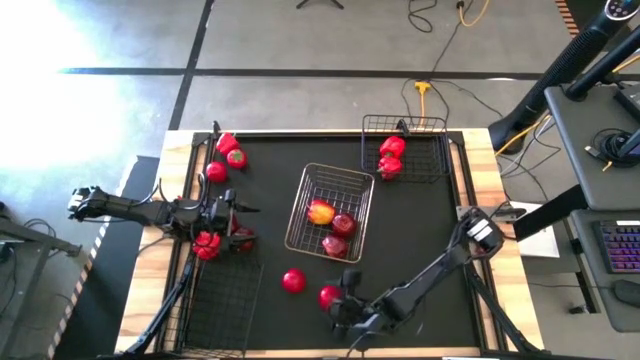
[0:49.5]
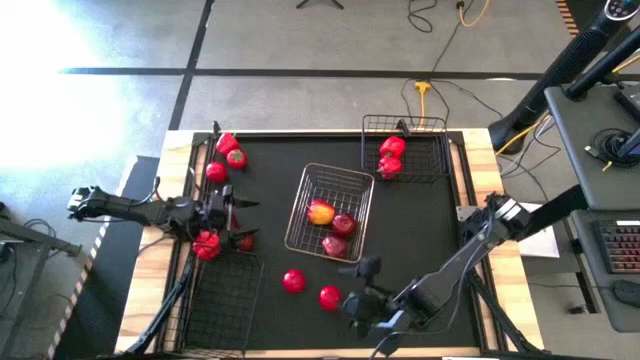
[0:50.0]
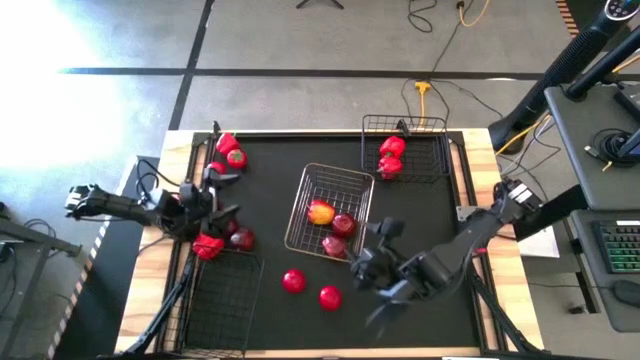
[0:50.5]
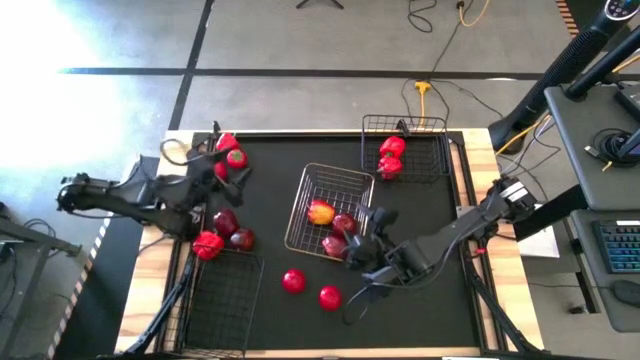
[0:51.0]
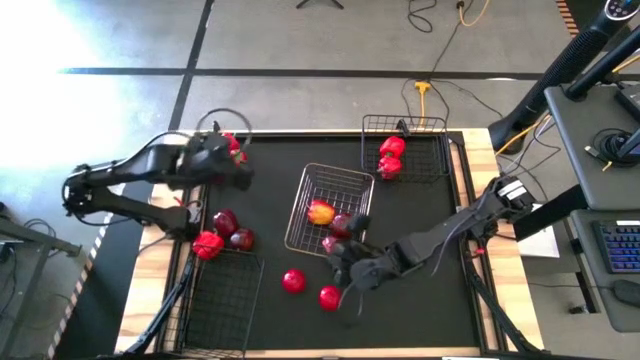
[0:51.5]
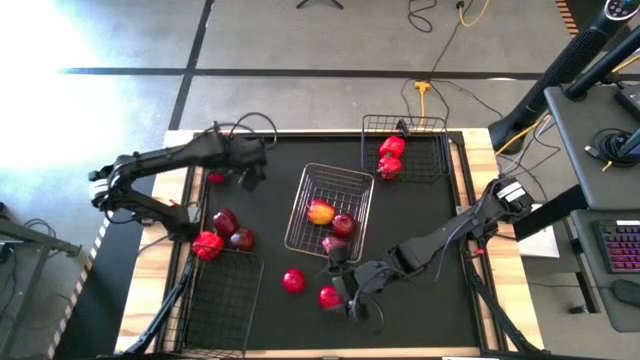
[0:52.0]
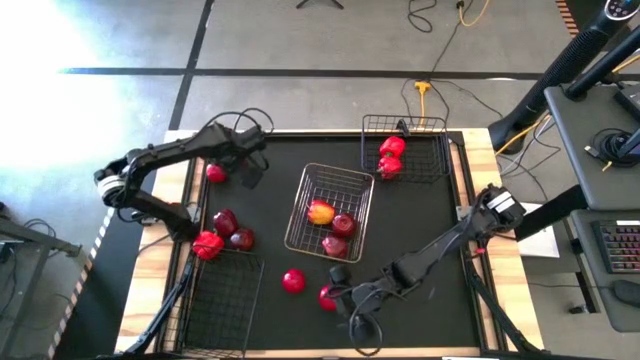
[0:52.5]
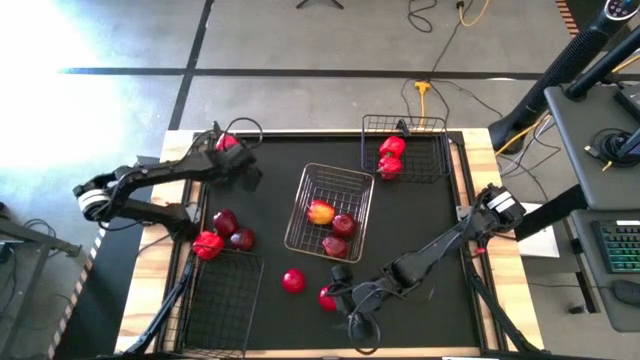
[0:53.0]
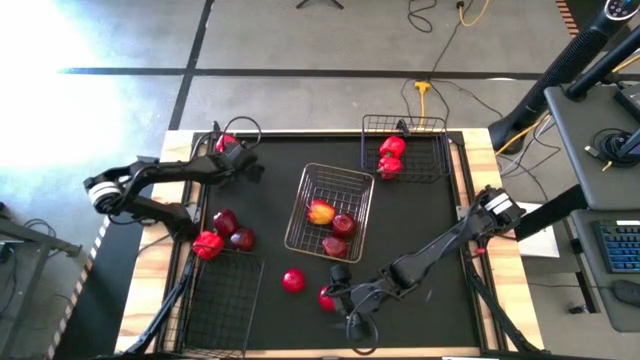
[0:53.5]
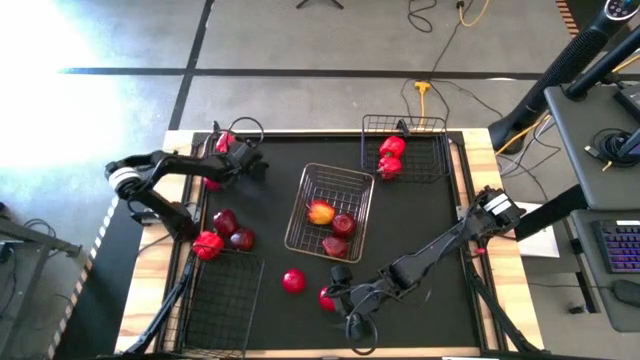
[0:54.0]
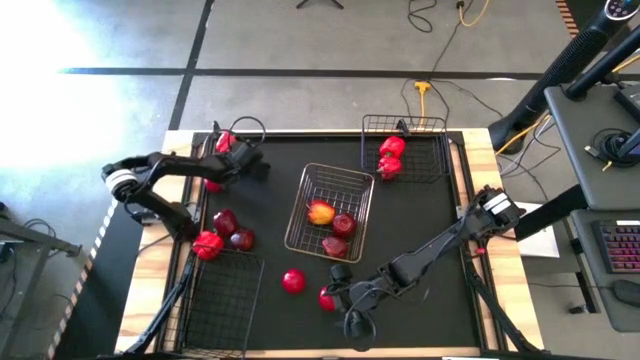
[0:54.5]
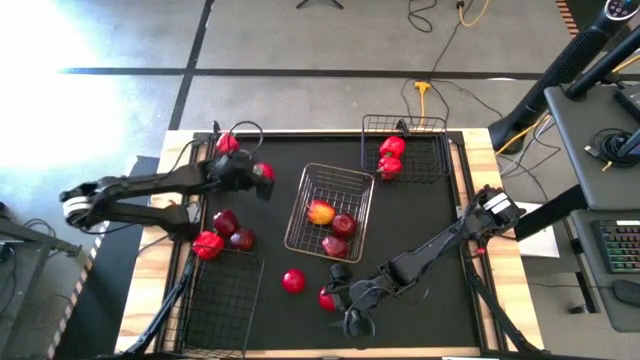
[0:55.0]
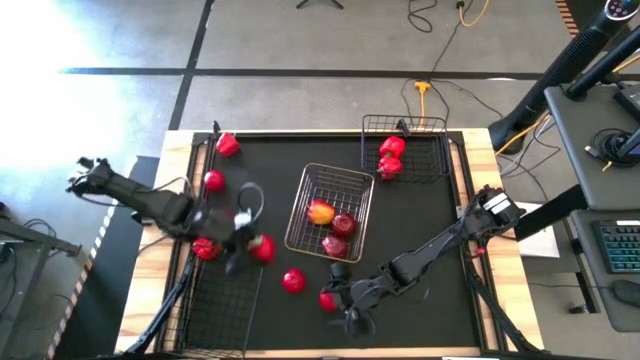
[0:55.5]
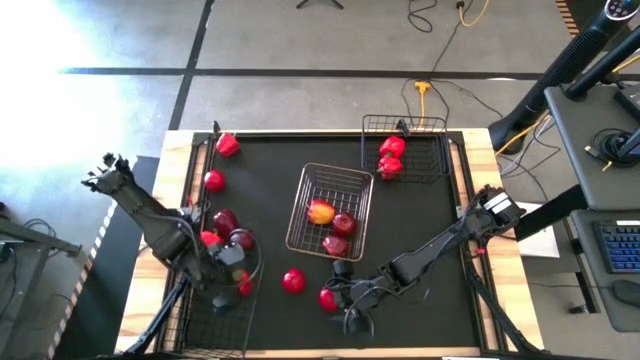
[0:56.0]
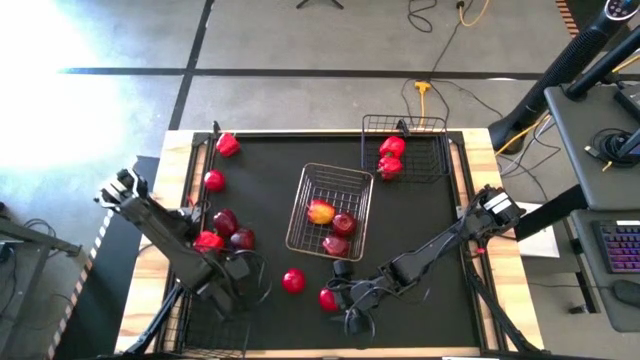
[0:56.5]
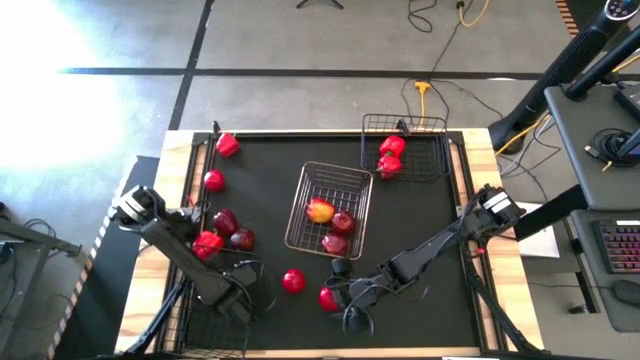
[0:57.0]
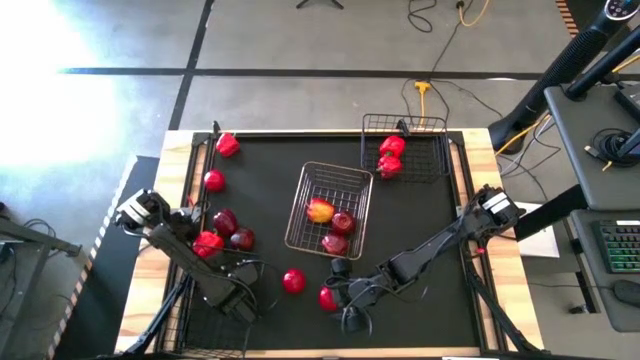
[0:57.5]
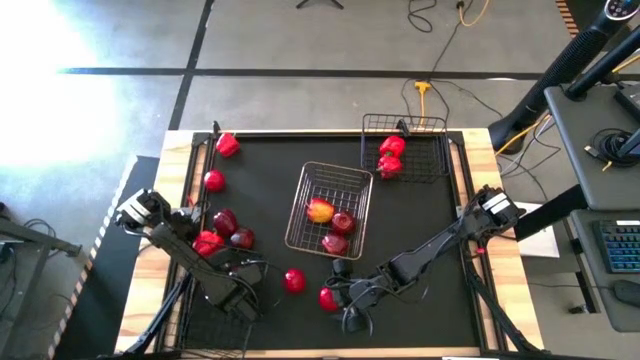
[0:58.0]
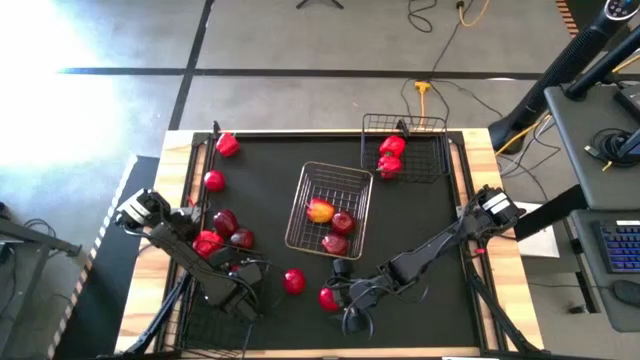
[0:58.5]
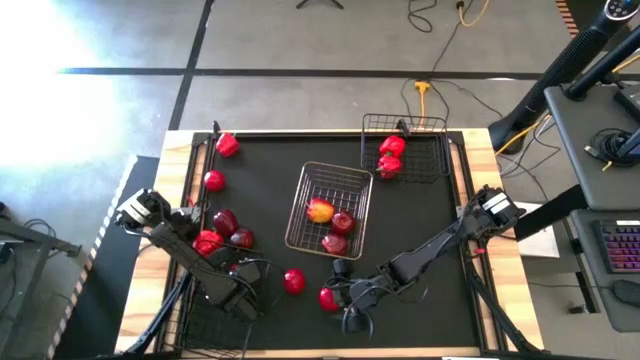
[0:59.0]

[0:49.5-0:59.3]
Task: Sort produce into baskets
Put the red tomato into the bottom black wire basket

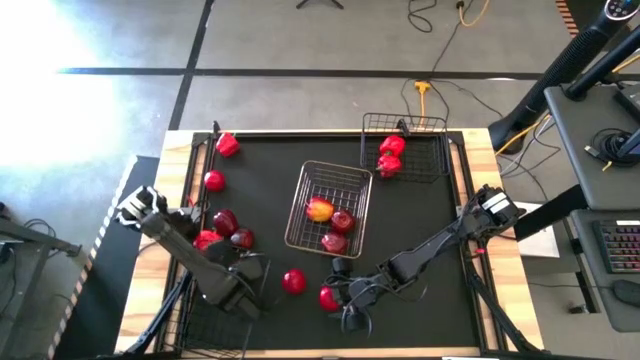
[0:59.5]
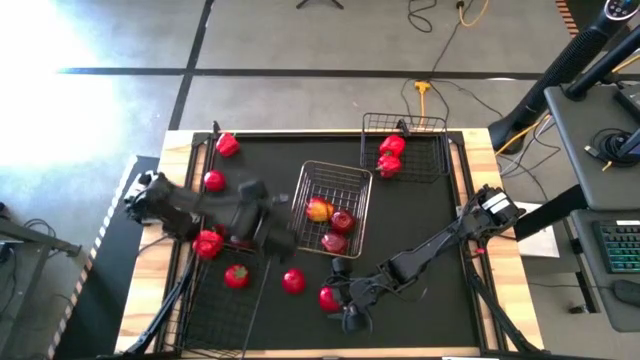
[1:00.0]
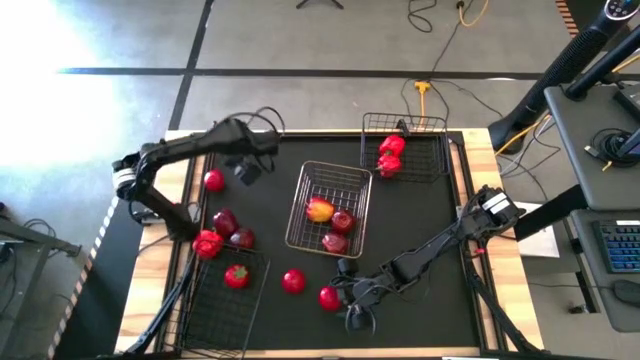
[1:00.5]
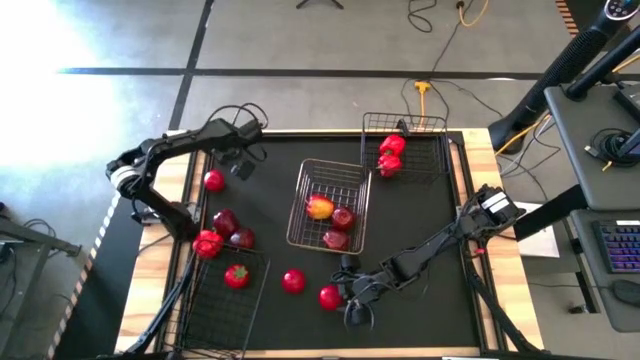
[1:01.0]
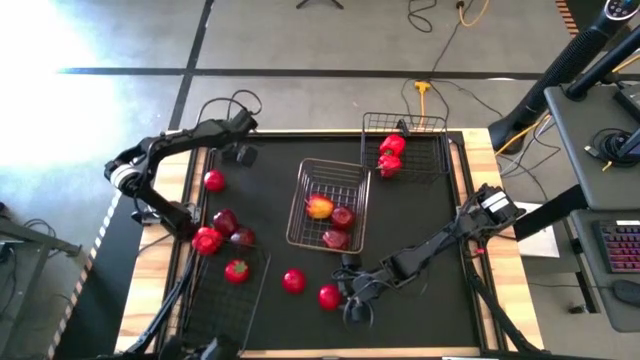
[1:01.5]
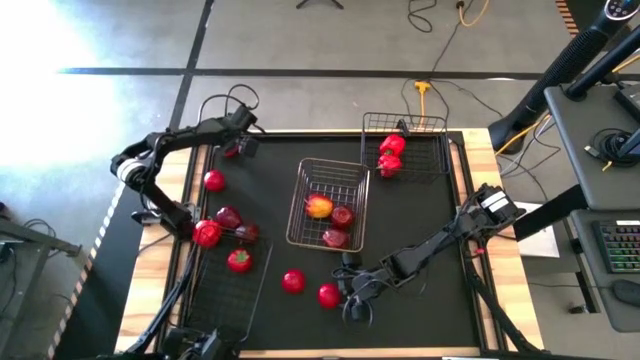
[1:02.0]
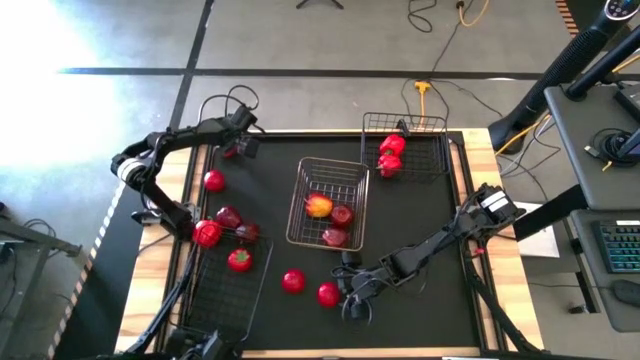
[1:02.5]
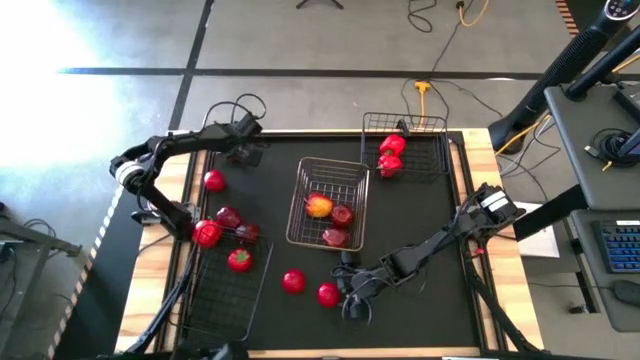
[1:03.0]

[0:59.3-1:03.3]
Put the red bell pepper into the top black wire basket

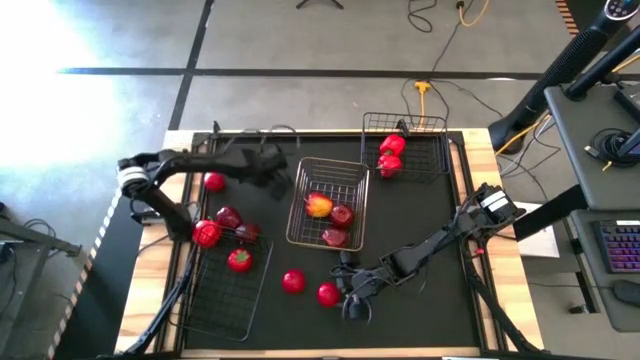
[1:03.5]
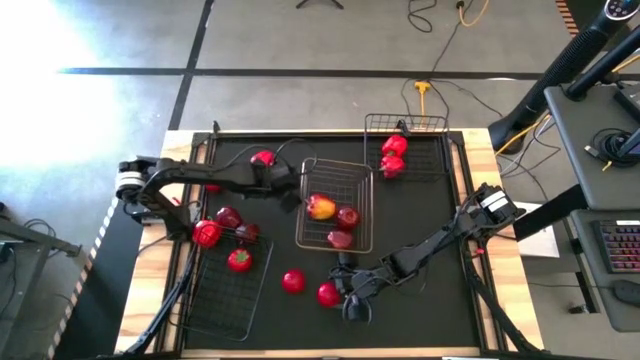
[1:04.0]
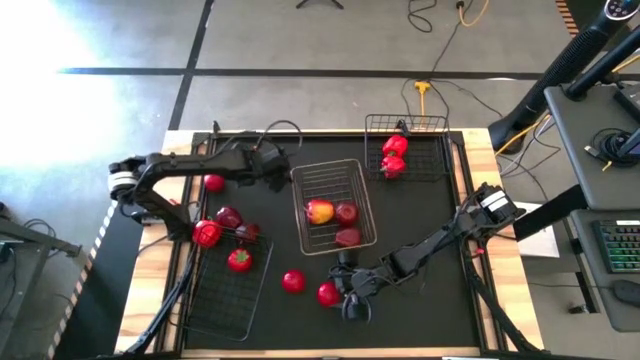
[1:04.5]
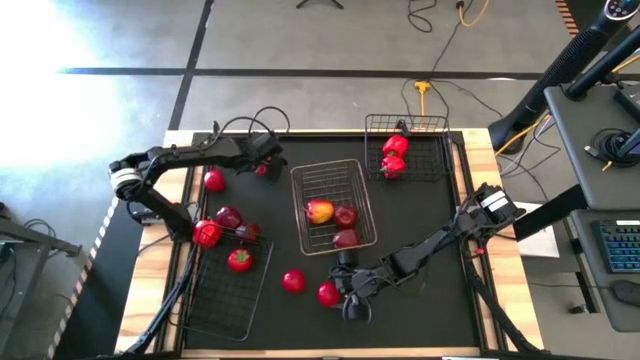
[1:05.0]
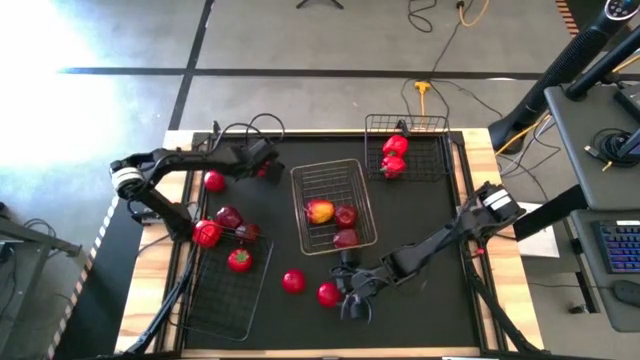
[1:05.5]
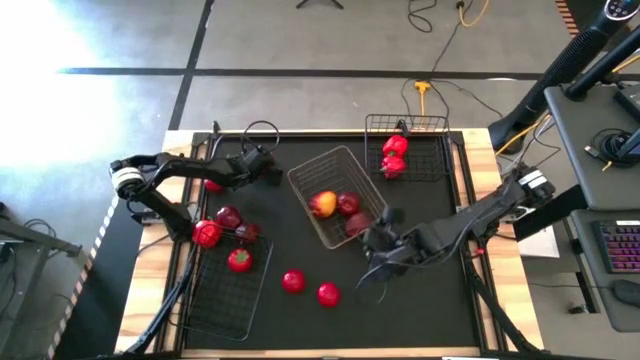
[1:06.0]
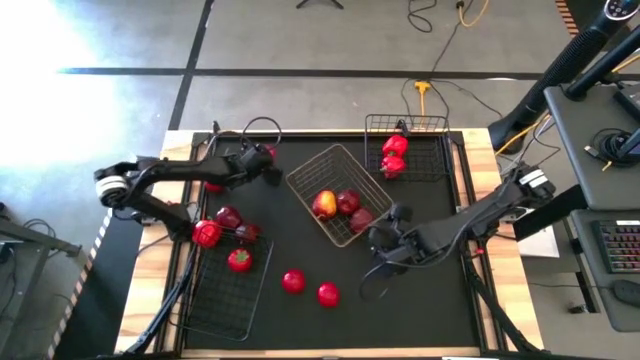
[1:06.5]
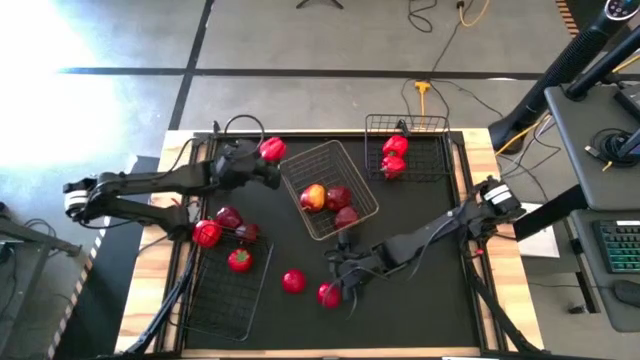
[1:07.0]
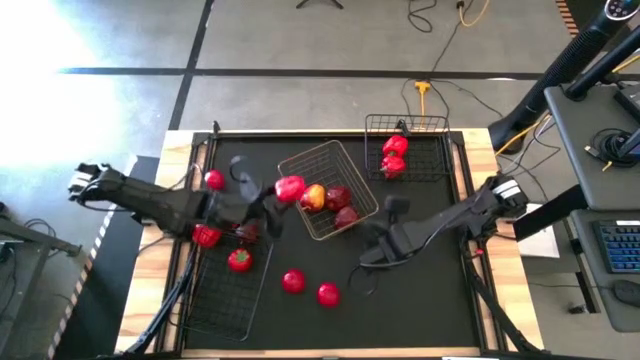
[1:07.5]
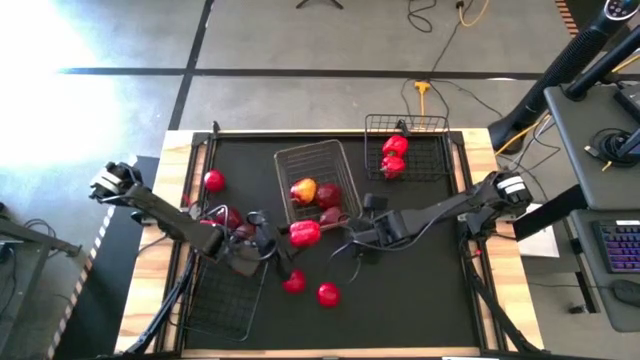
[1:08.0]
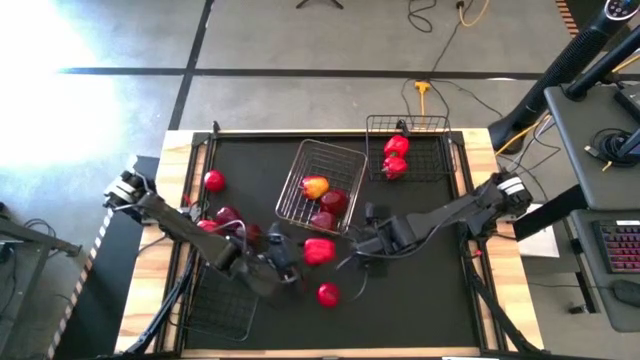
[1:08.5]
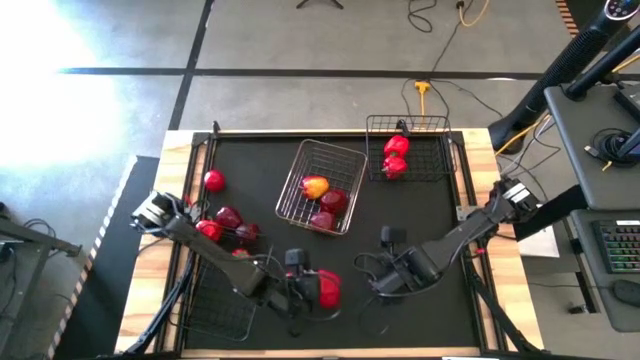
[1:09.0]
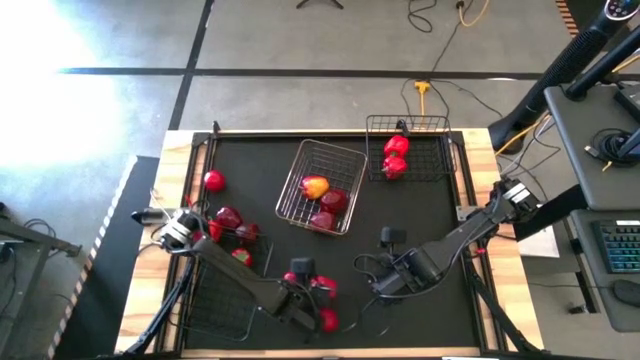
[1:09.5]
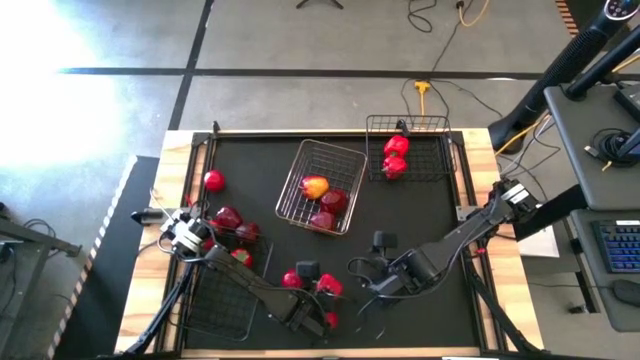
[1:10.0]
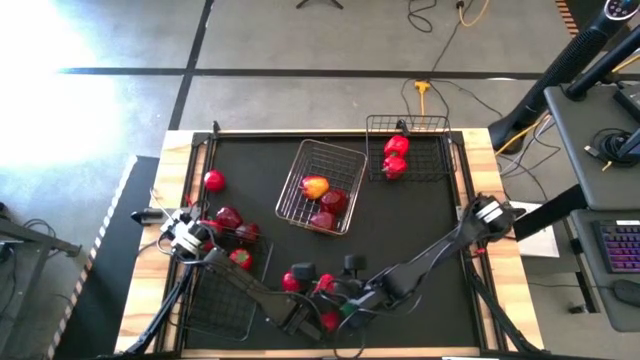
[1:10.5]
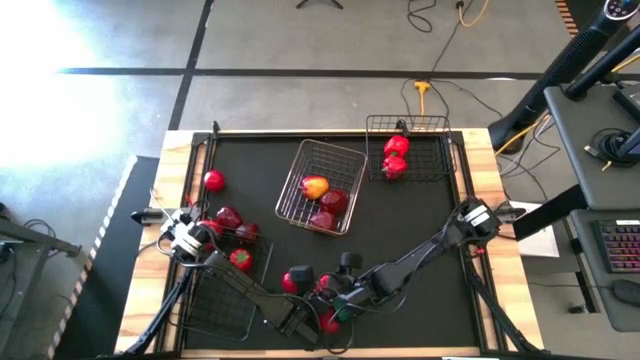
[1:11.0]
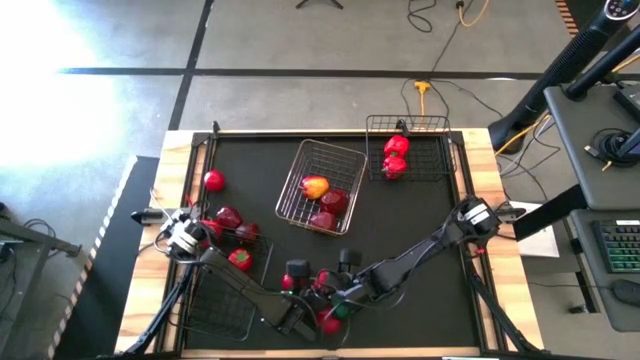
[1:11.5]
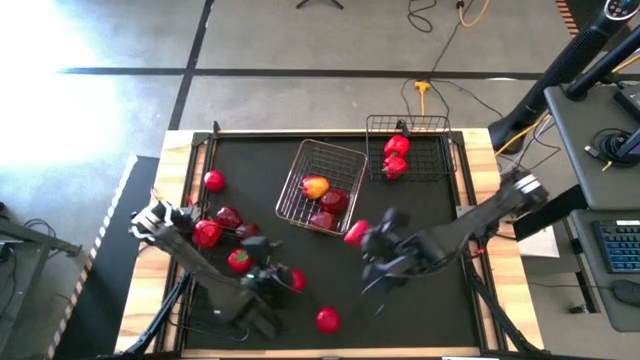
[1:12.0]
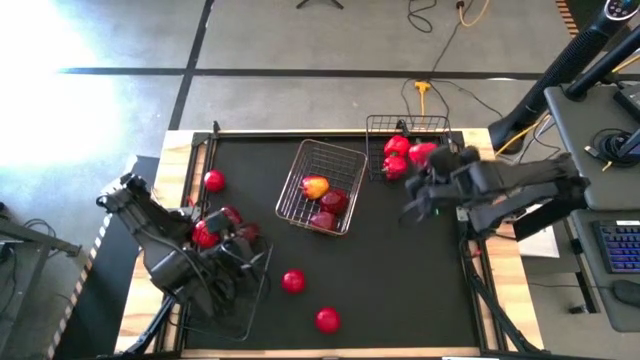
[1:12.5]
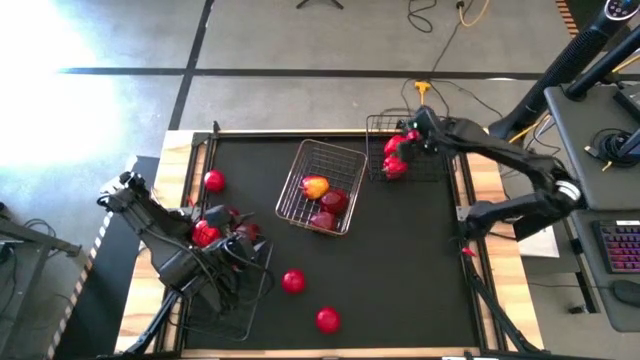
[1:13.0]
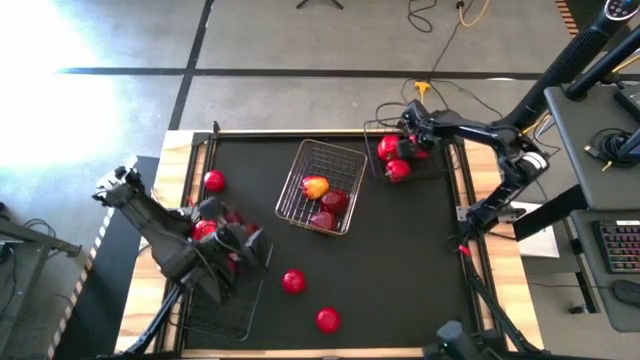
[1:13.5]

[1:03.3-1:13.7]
Put the red bell pepper into the top black wire basket
